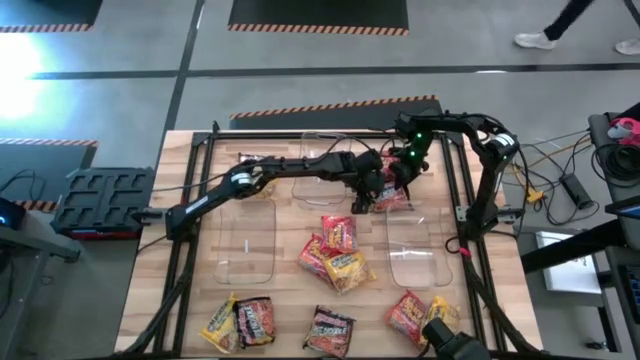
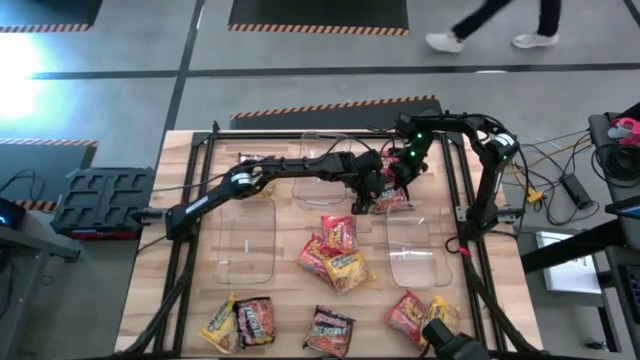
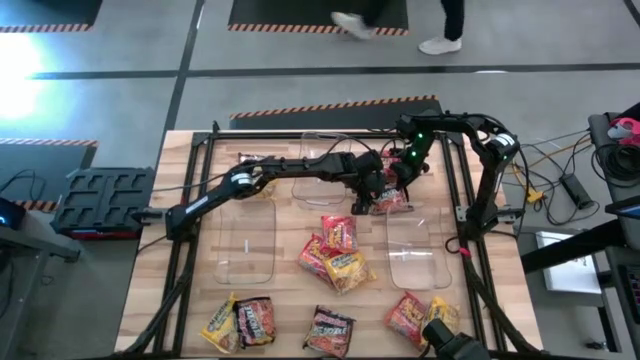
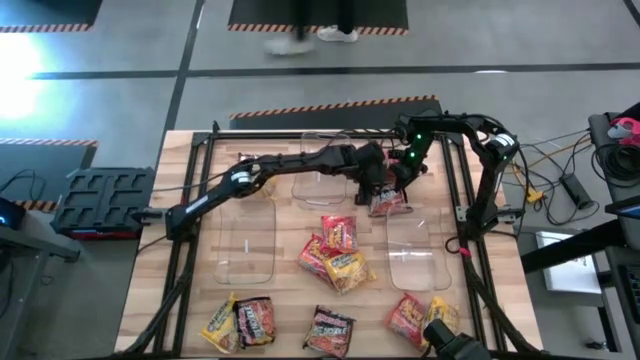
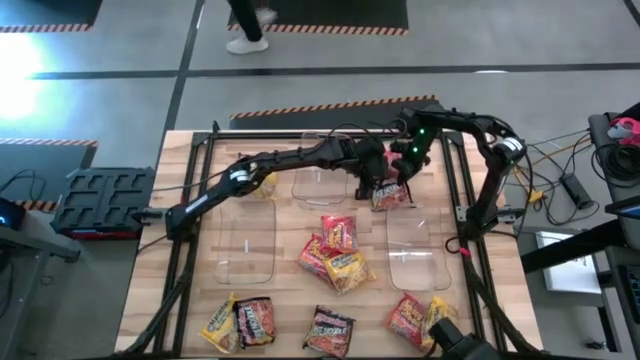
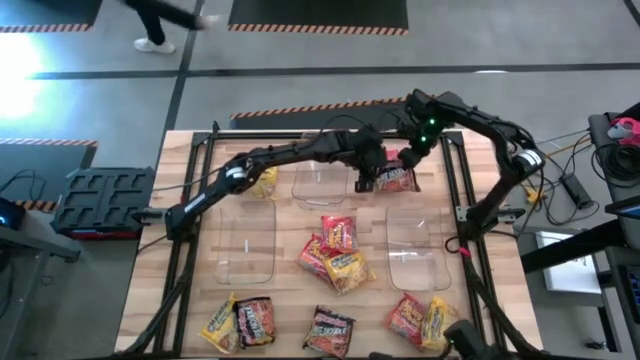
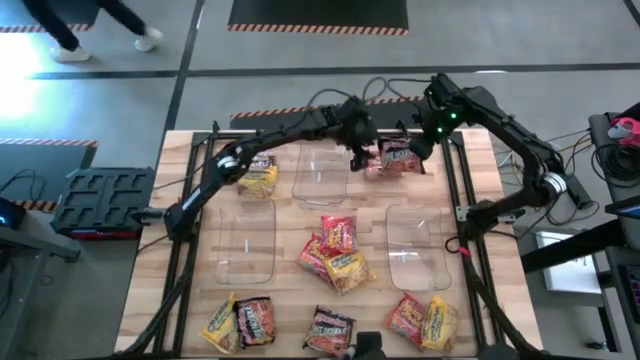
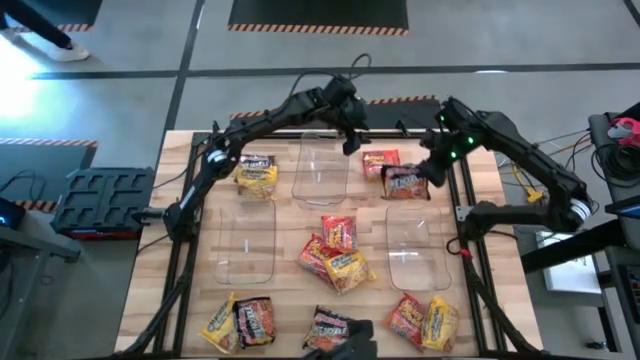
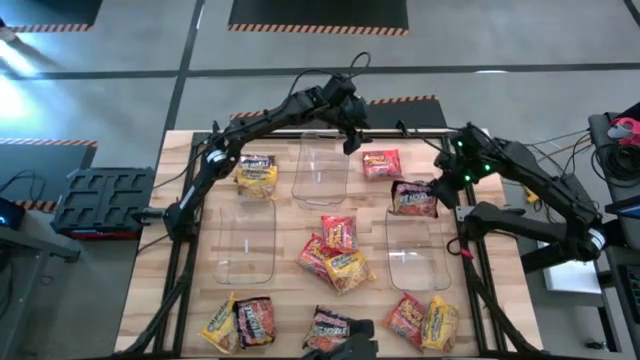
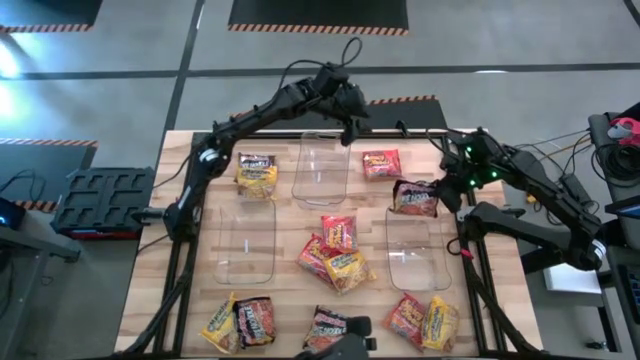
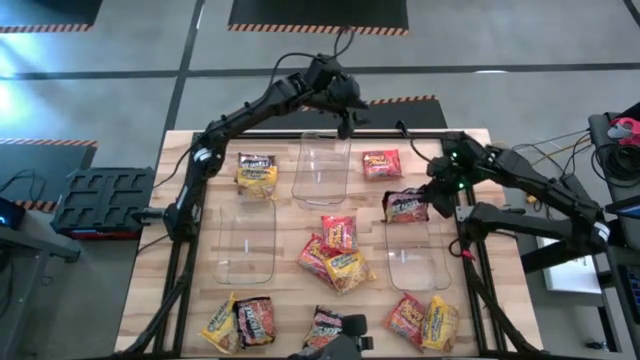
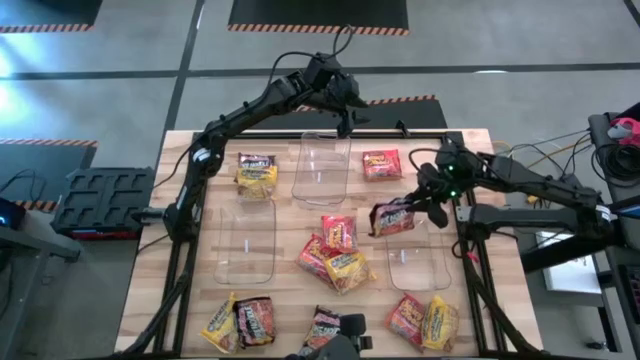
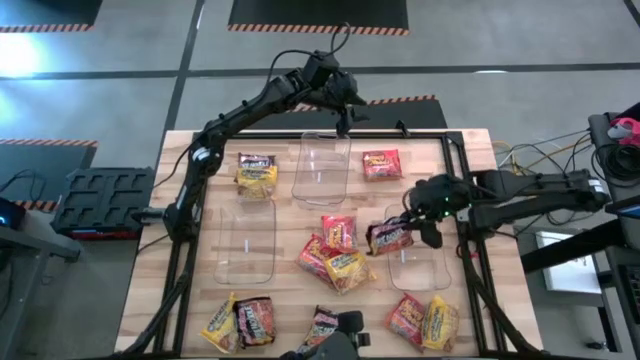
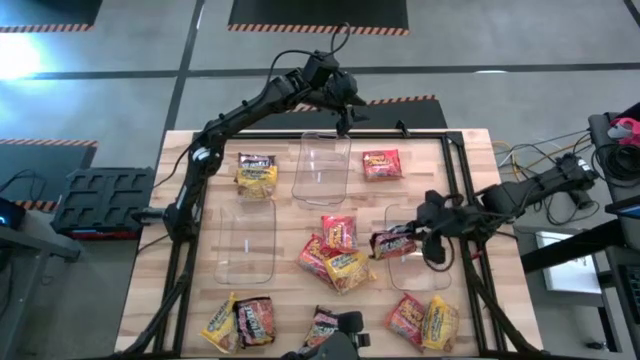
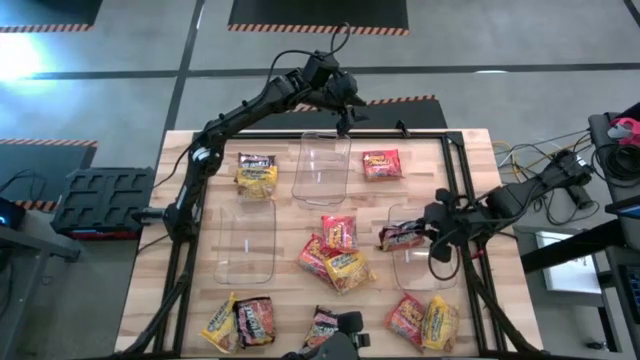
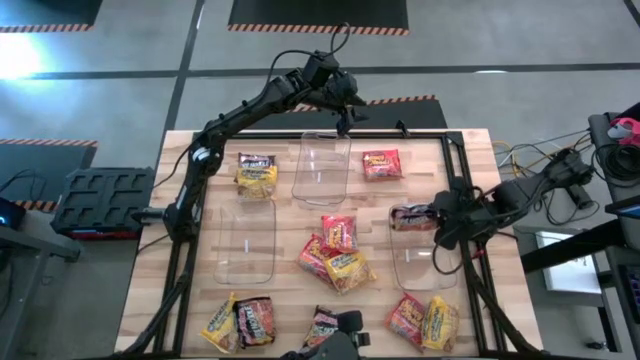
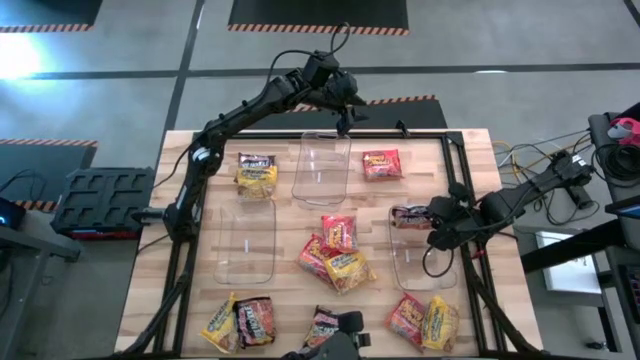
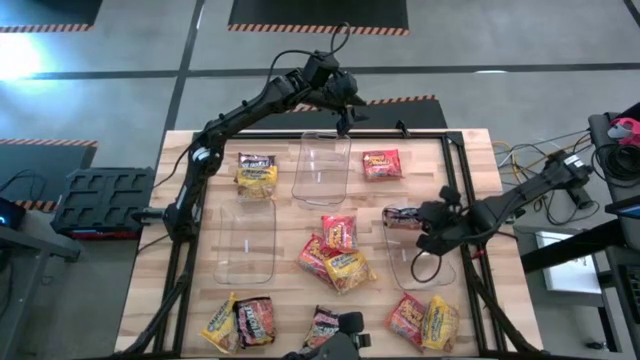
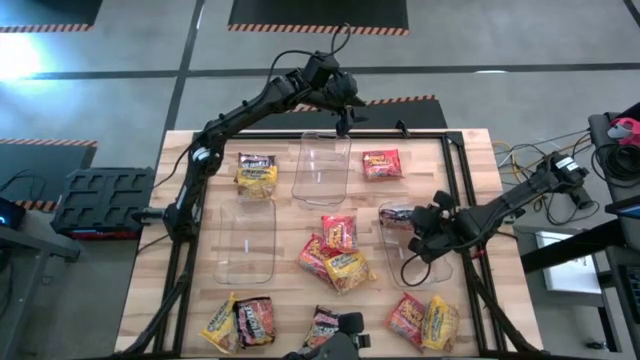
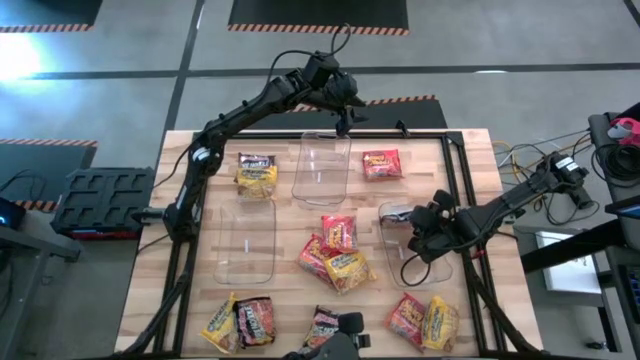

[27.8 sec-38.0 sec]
Task: Sort Maruchan noodles
Put the top right orange pack noodle into the bottom right transparent bin

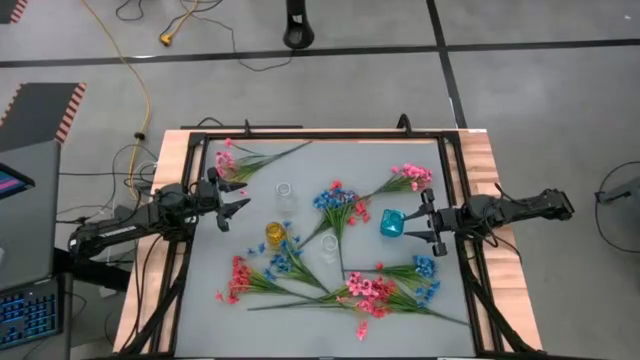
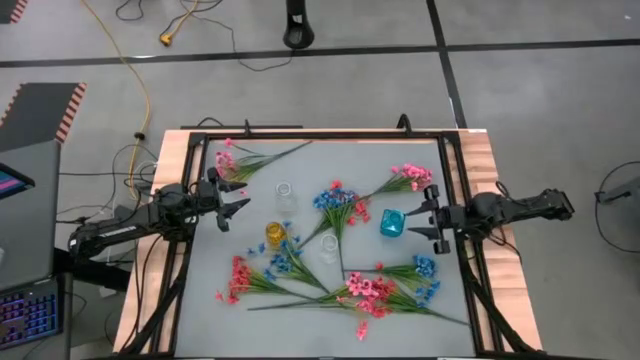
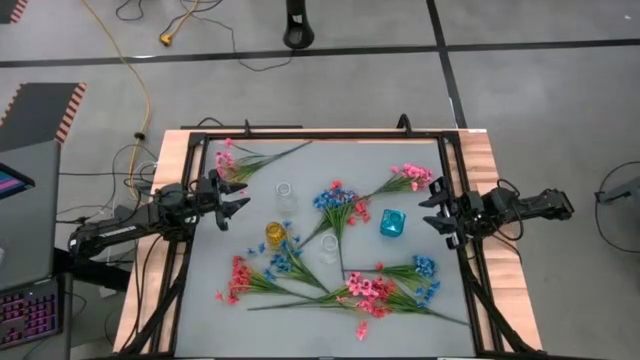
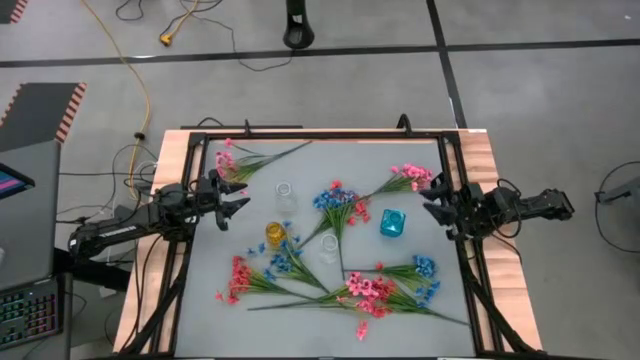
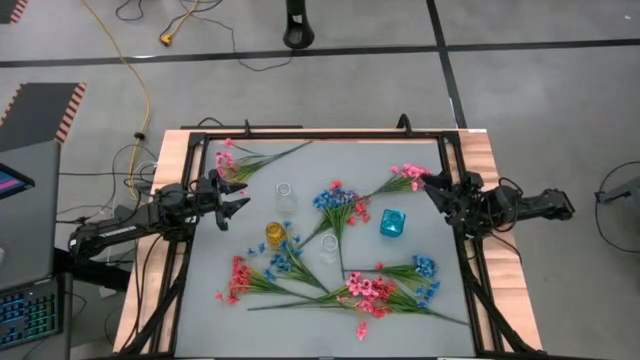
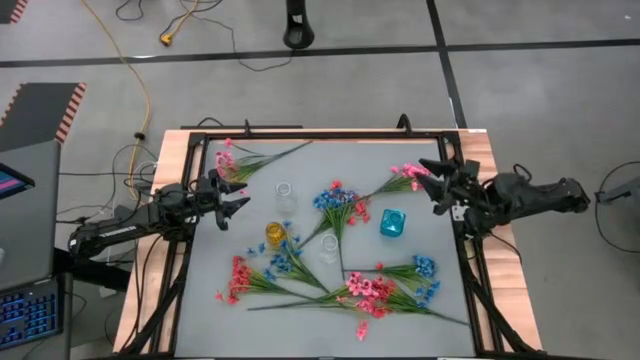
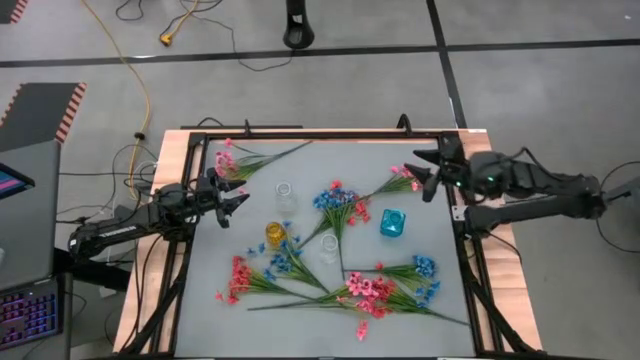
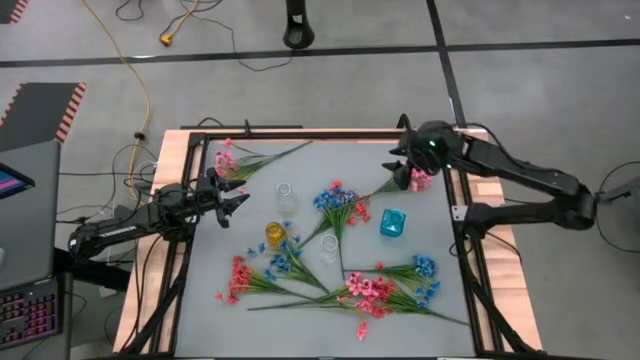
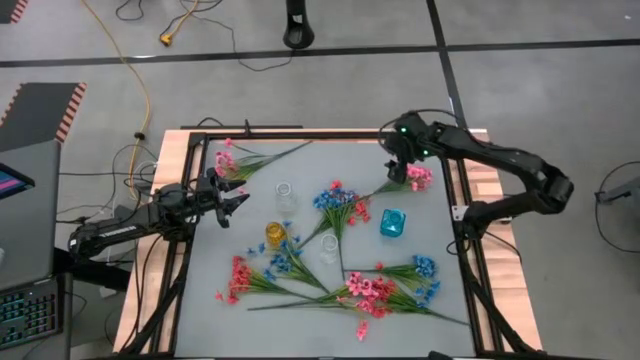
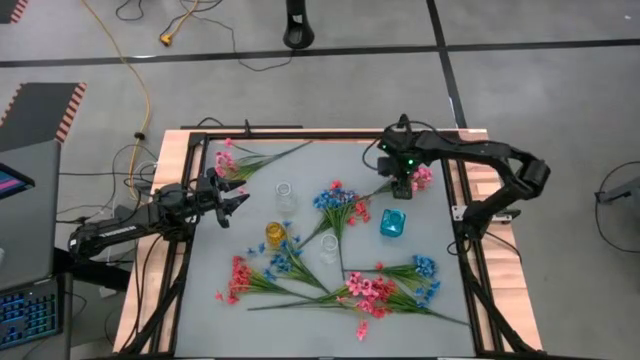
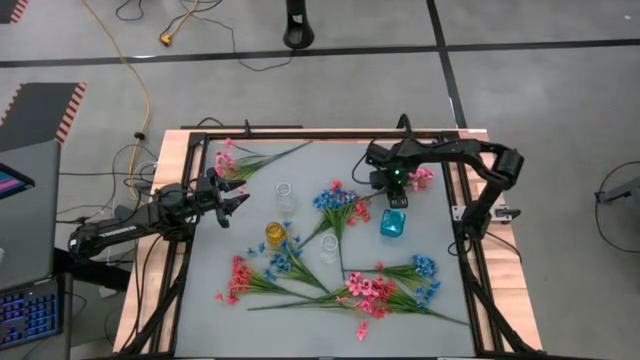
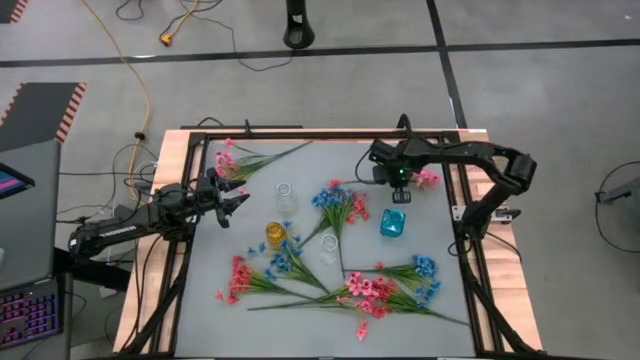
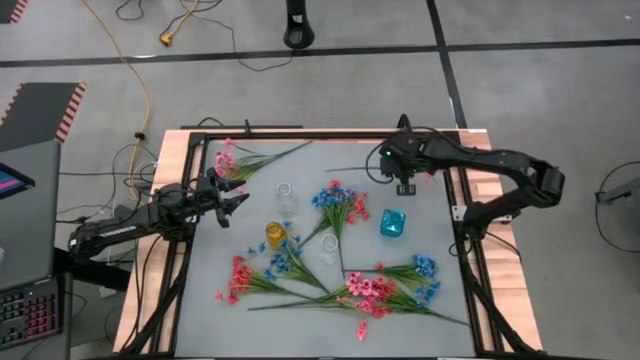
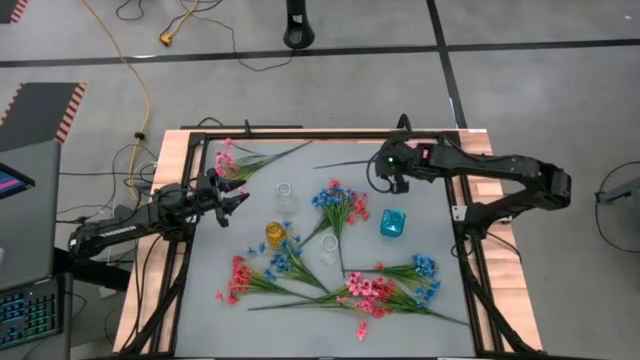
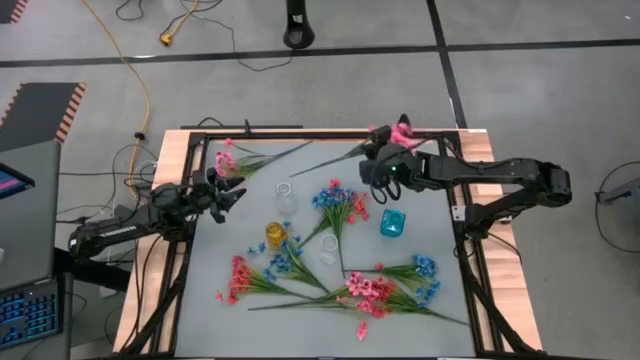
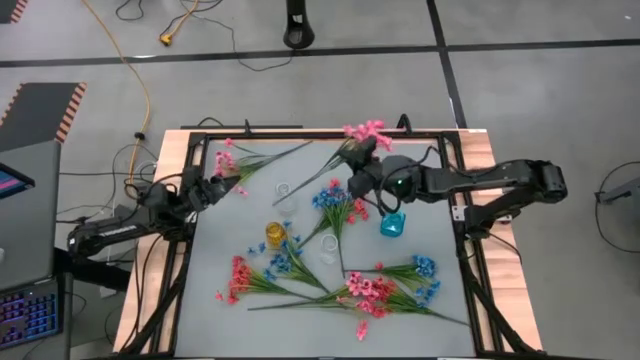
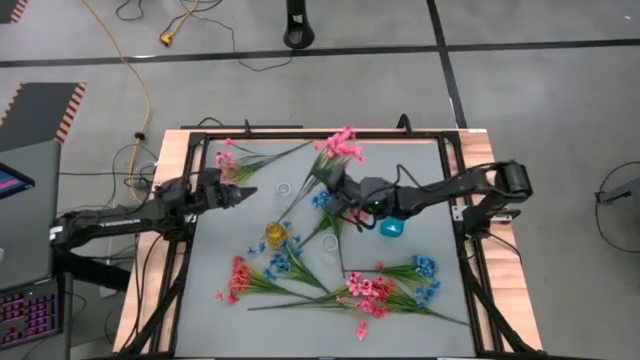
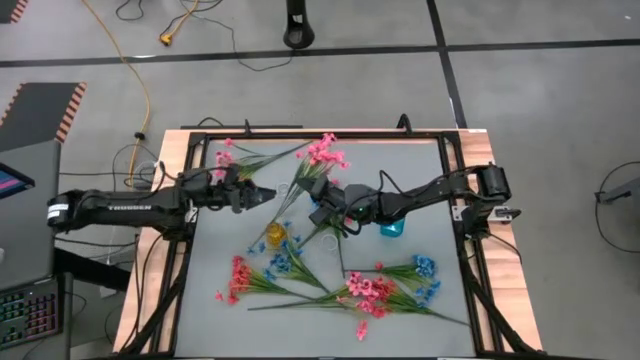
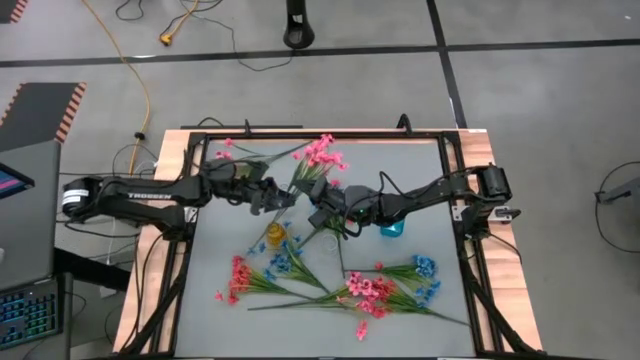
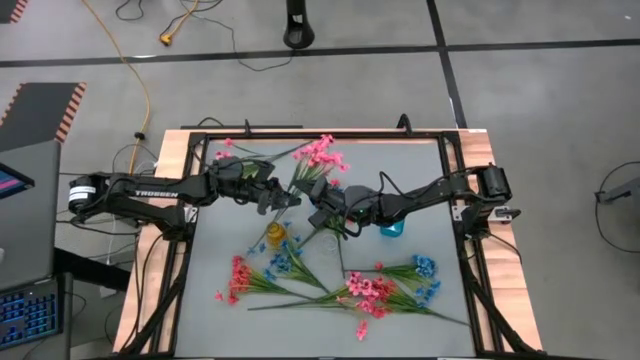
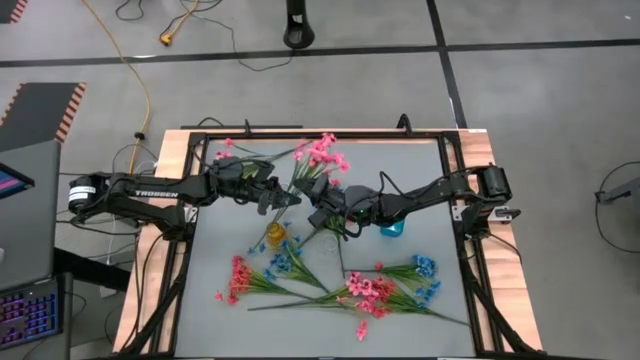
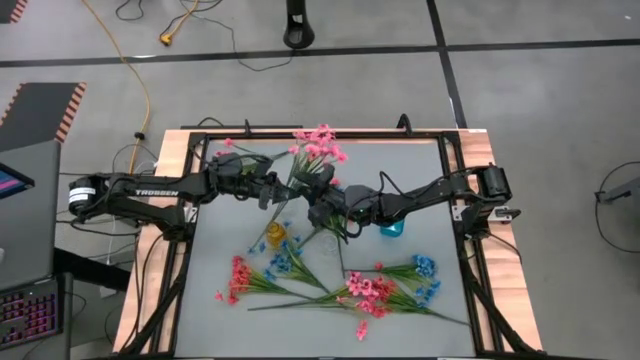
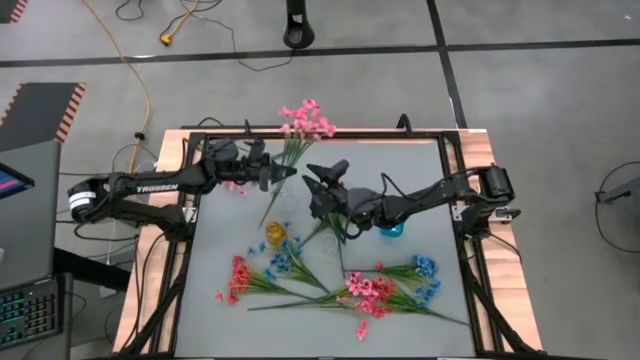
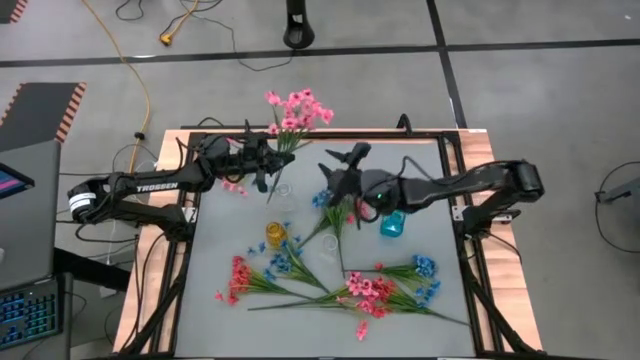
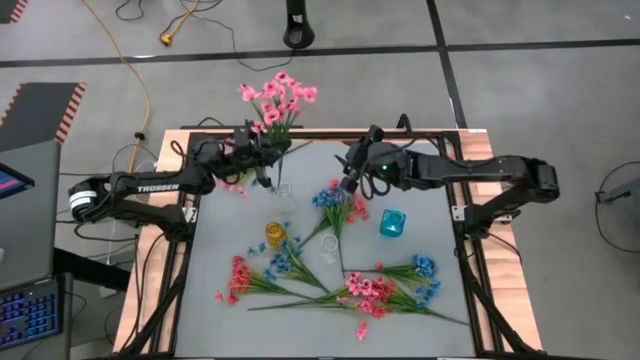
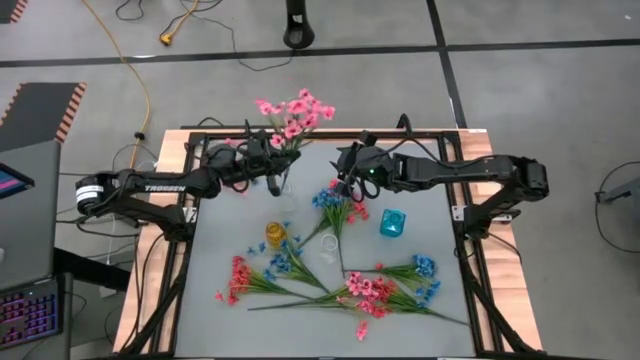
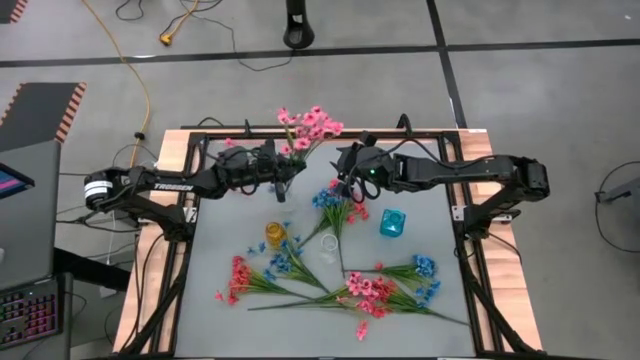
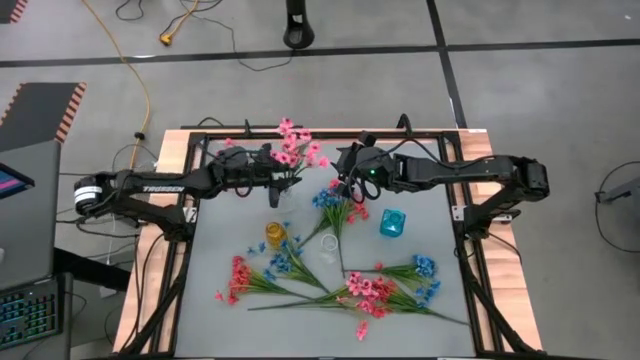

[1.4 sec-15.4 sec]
Task: Sort flowers into vase by color
Put the top right pink flowers into the top transparent vase
